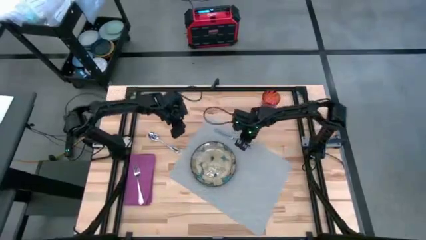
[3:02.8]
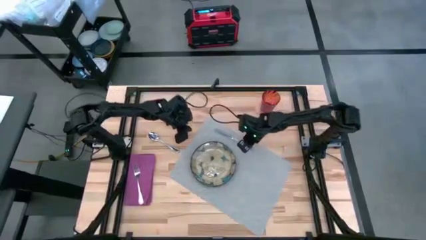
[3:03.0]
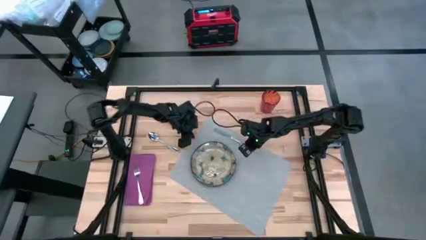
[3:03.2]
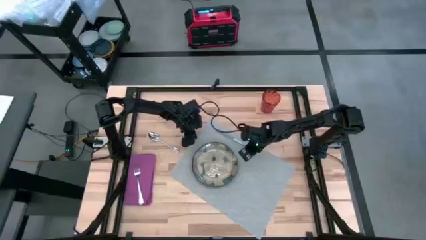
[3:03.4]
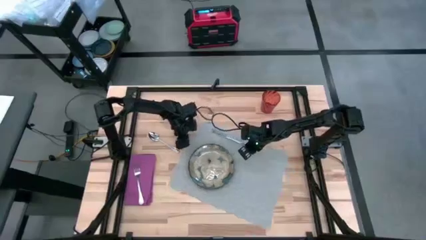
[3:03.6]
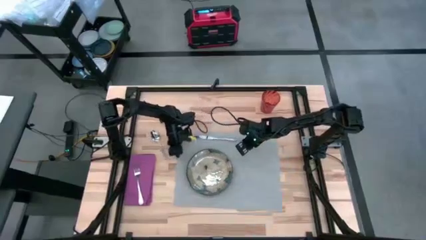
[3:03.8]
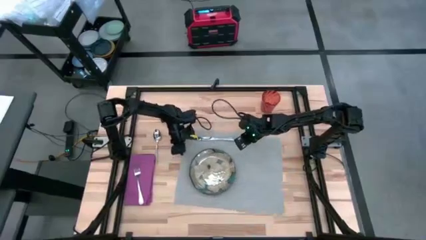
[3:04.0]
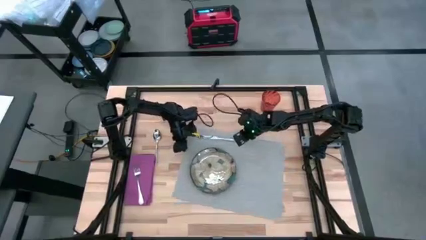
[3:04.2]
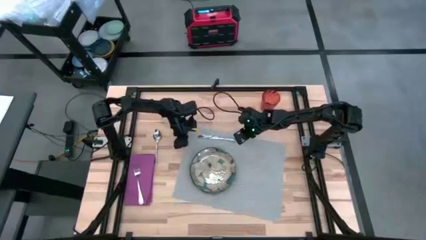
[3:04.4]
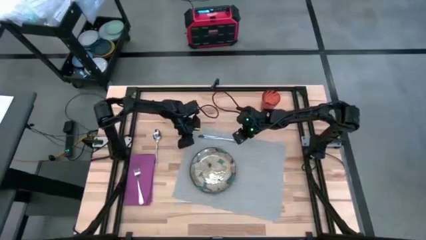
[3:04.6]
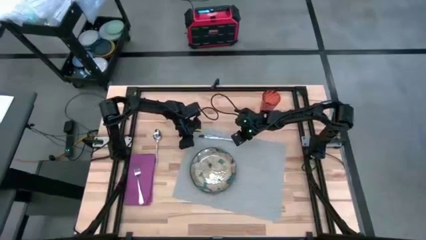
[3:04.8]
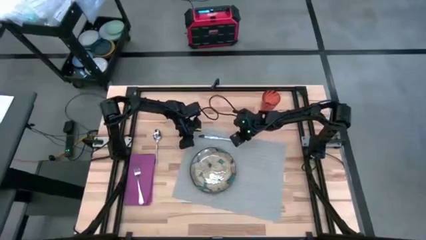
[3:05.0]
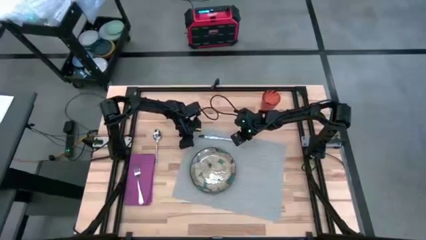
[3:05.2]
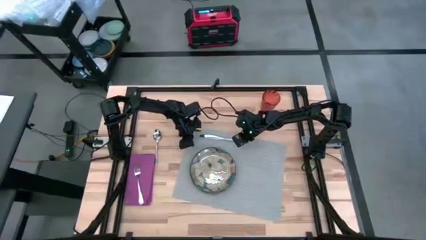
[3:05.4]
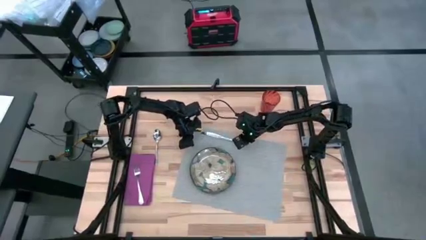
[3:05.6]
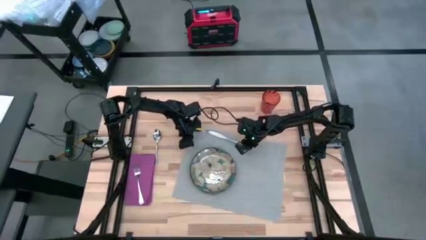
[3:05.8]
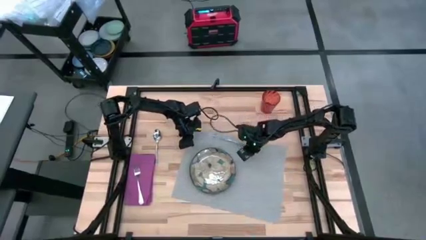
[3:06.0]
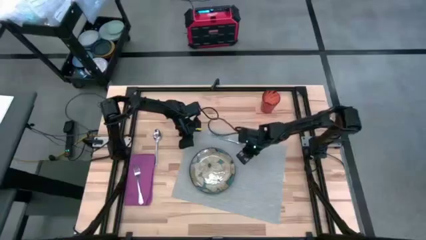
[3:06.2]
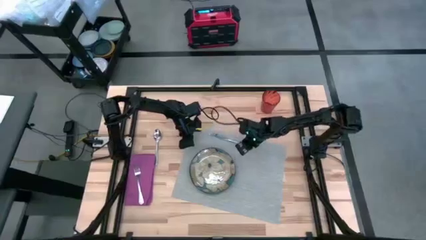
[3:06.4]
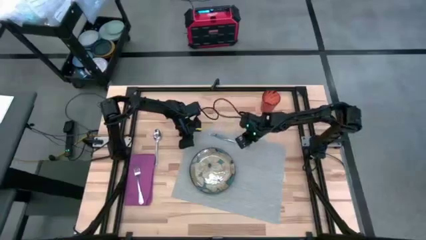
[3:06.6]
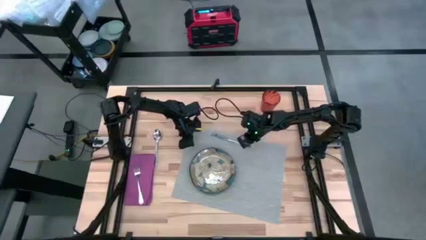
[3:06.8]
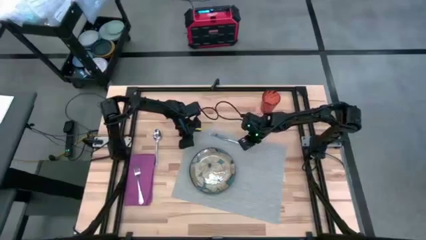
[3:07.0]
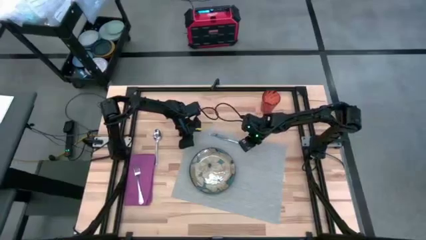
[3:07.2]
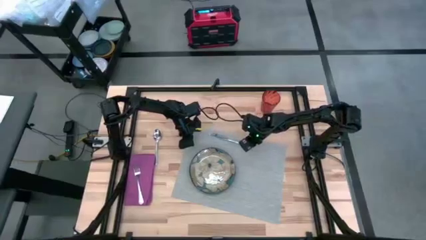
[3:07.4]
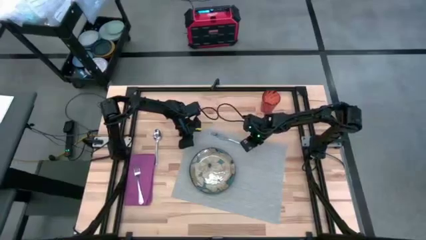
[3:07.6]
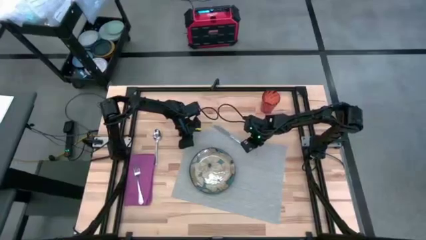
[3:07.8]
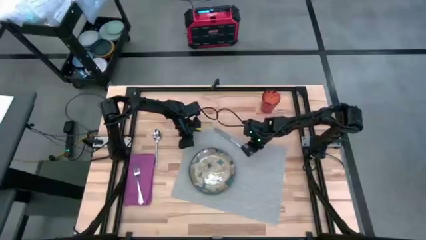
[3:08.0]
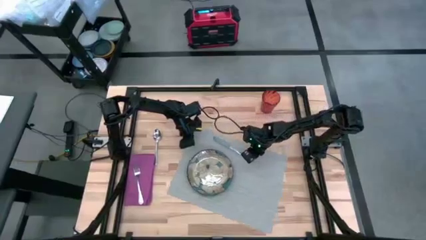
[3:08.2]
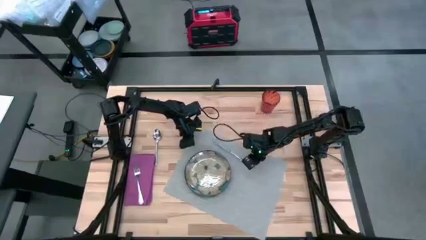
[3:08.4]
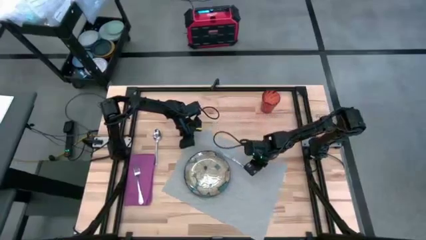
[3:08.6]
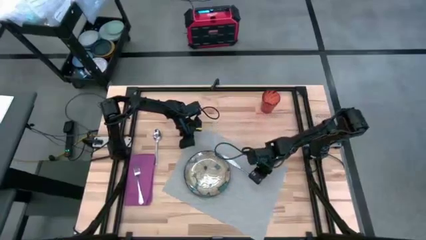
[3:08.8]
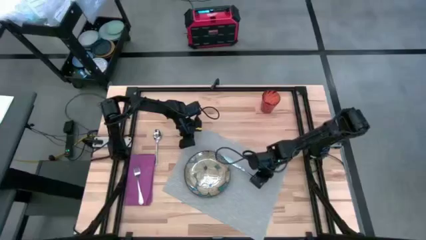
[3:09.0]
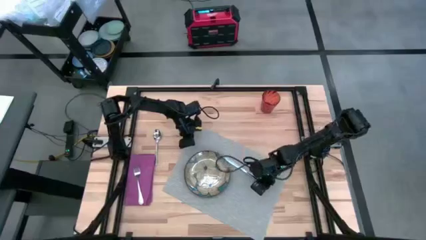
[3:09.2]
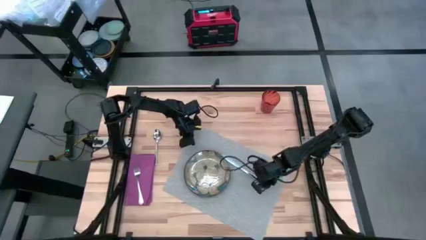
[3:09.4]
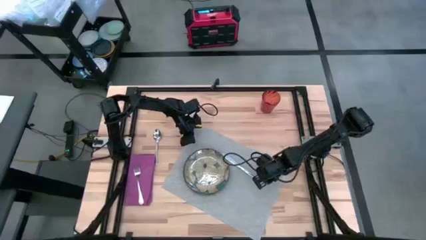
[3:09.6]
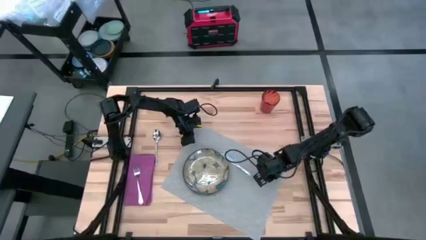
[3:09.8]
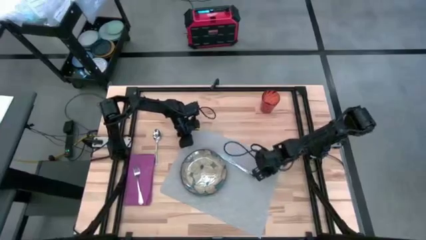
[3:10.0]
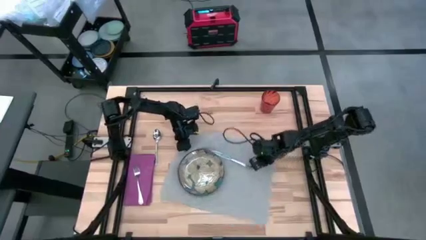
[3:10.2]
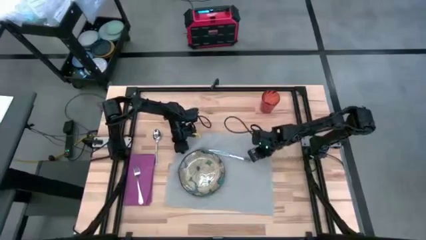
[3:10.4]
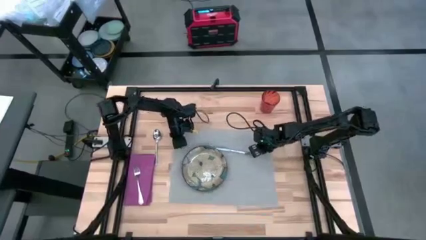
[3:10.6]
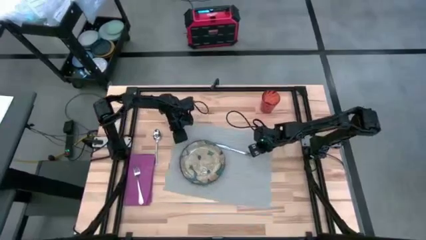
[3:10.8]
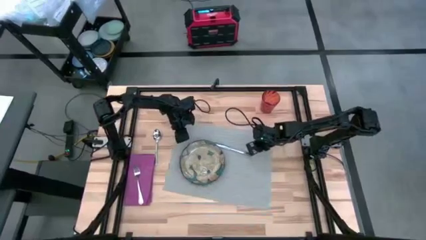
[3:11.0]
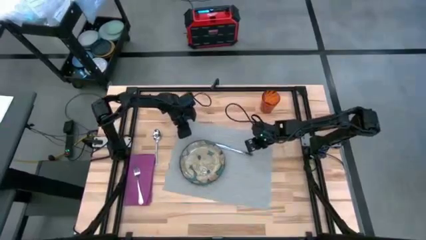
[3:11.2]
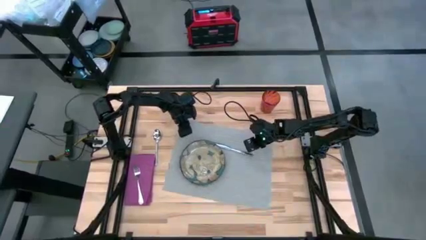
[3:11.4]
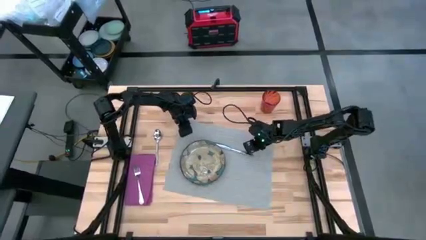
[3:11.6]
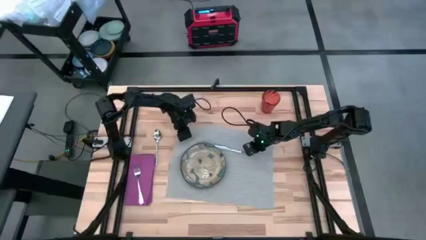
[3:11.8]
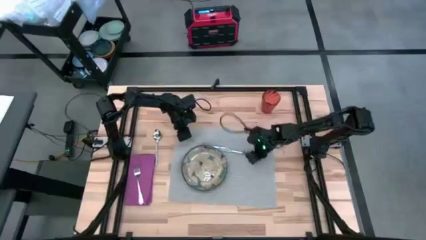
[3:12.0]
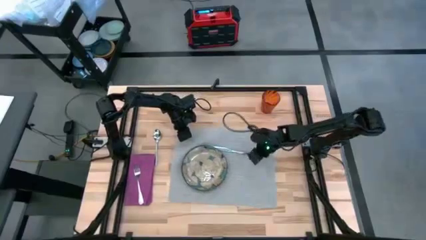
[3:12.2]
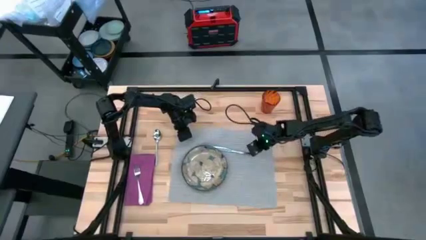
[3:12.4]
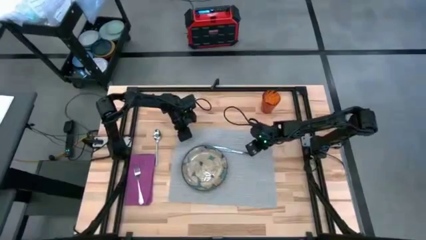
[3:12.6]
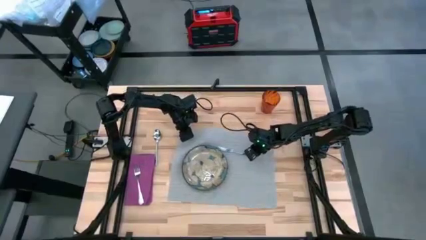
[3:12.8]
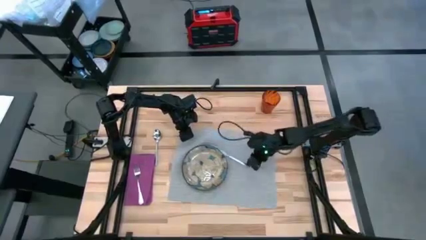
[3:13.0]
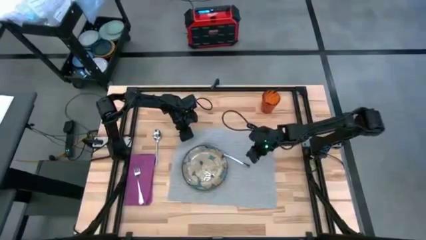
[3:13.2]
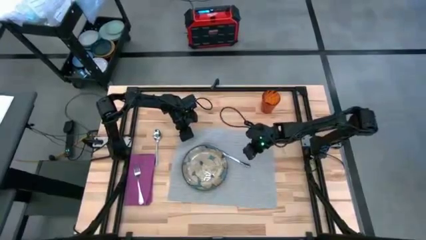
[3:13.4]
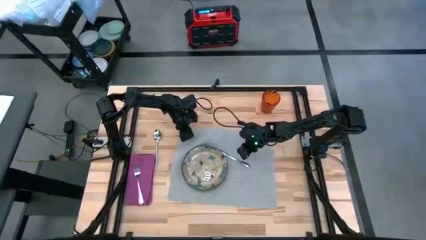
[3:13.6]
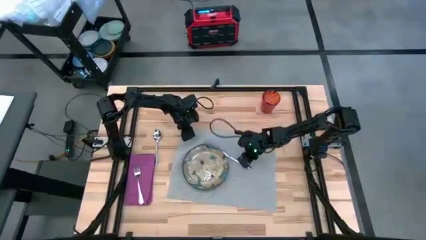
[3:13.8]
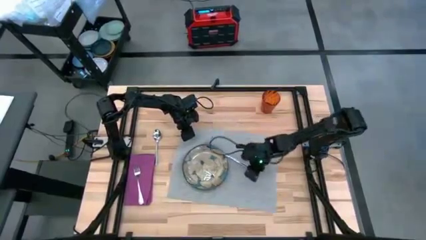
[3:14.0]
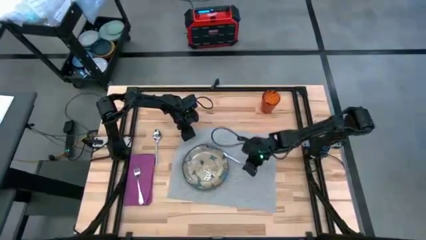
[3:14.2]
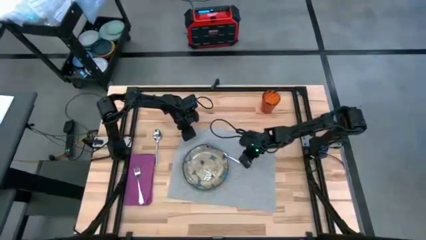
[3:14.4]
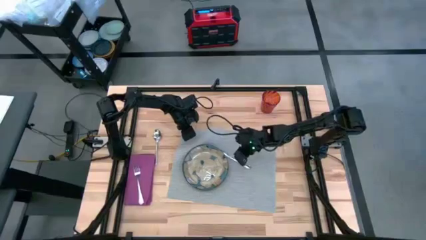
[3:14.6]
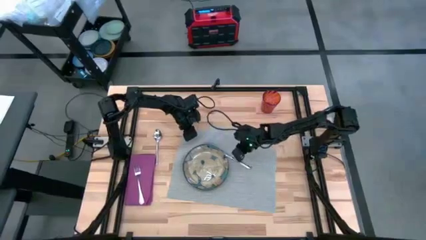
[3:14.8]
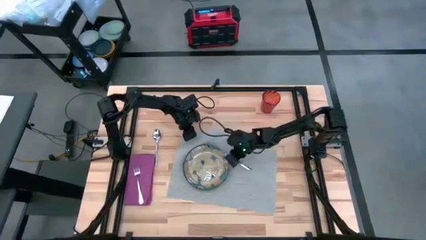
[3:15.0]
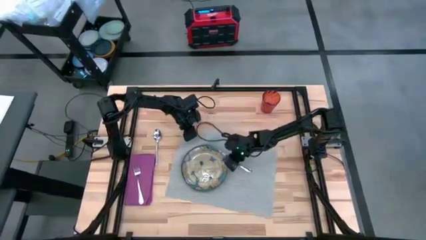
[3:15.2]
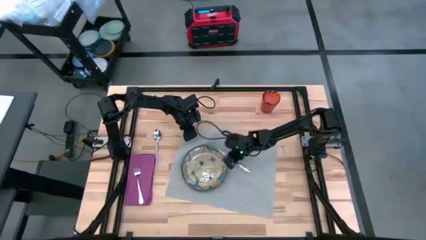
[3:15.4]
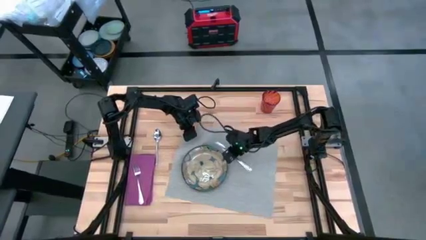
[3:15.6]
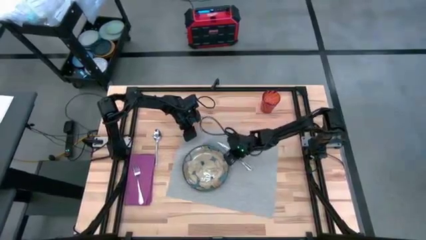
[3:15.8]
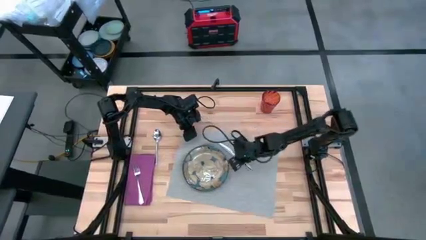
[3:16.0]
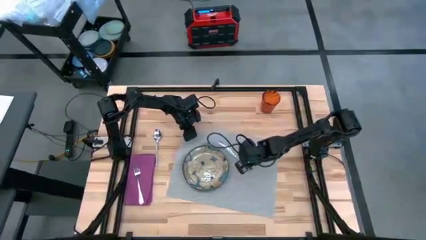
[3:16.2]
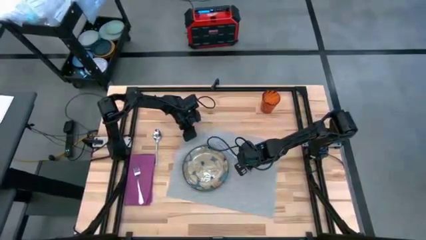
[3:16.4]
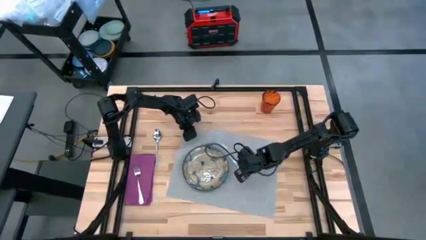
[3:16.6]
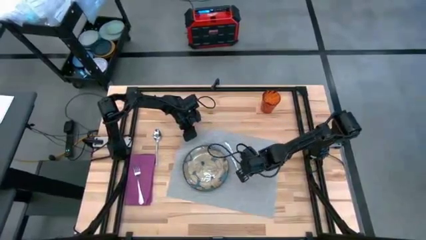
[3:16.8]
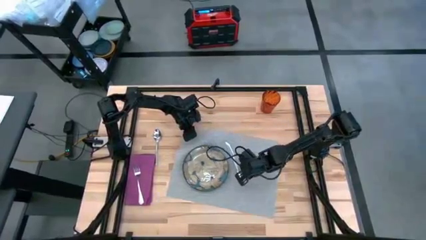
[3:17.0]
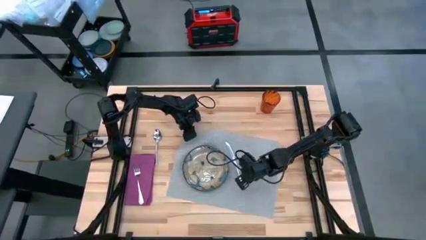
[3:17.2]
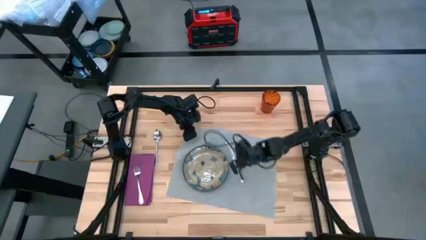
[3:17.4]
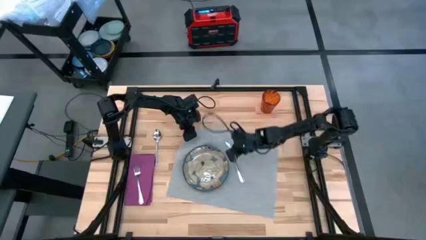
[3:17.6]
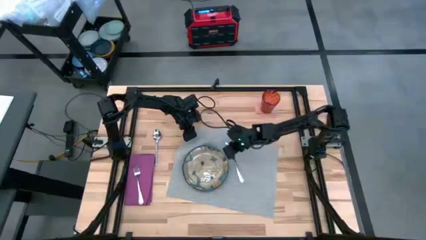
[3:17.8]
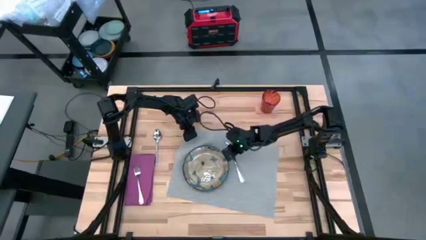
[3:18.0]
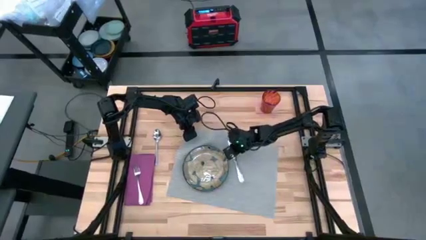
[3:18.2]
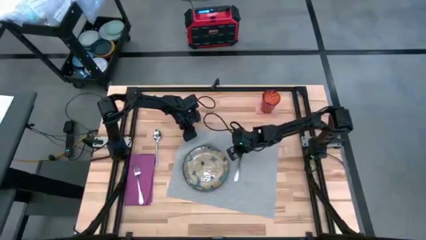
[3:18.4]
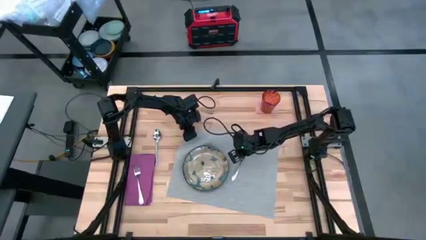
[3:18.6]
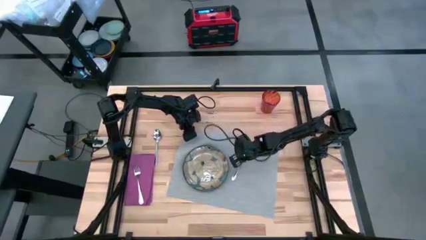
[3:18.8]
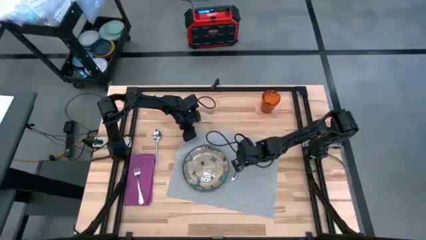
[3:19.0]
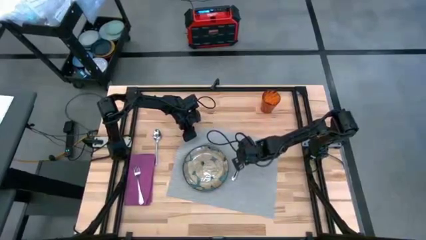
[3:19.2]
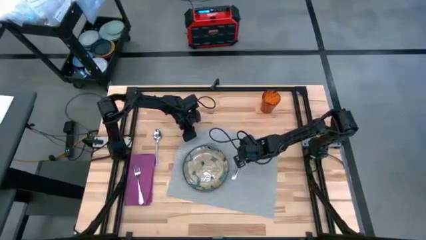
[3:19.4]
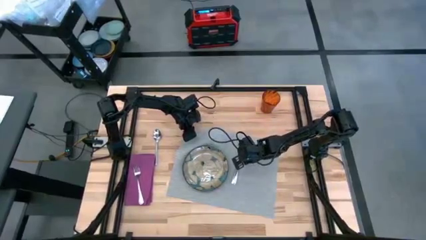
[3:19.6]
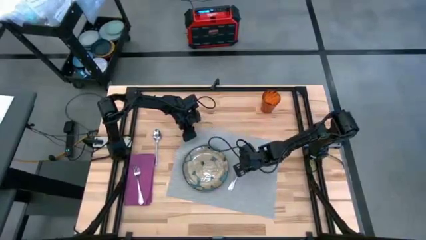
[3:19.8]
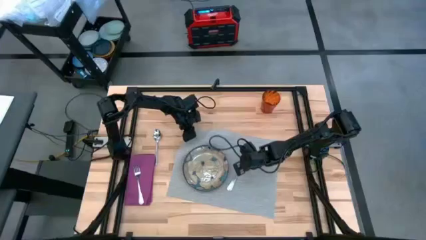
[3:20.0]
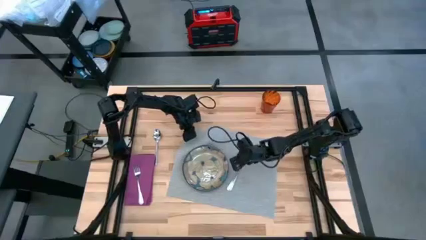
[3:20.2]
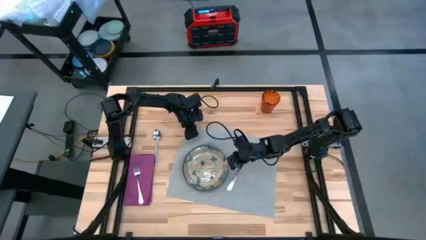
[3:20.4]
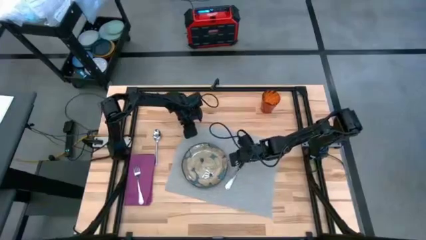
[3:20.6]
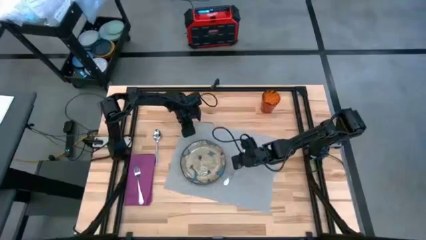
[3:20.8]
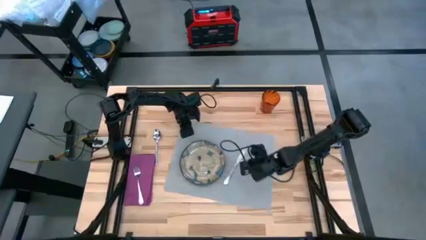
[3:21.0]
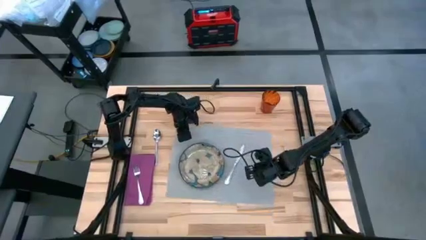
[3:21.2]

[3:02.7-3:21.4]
Task: Set table place
Move the silver knife beside the white floral patterned plate on the gray placemat
